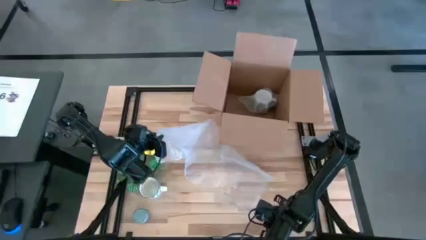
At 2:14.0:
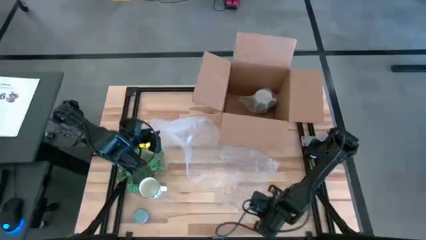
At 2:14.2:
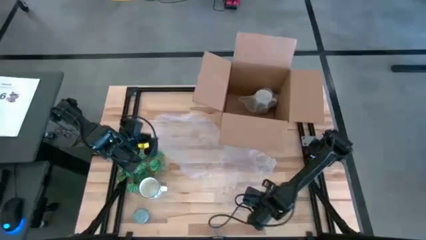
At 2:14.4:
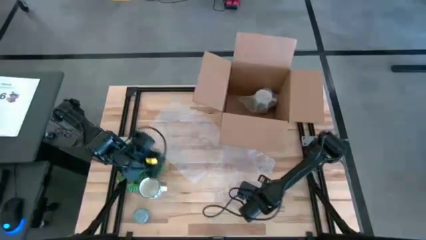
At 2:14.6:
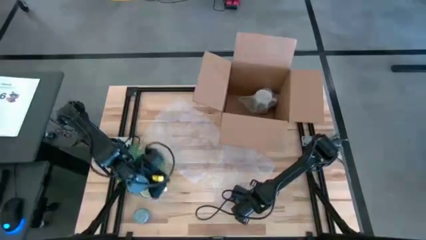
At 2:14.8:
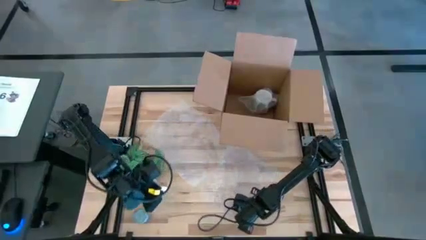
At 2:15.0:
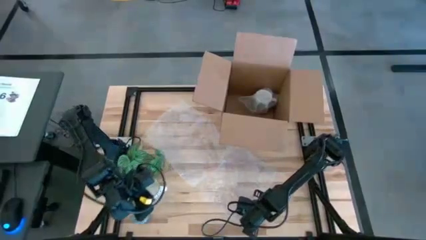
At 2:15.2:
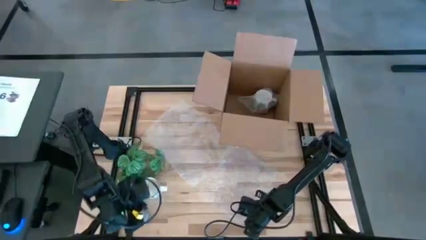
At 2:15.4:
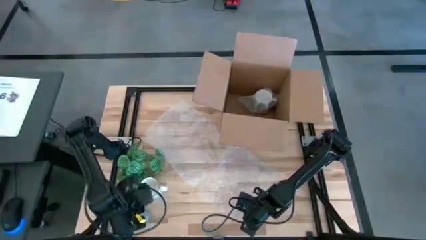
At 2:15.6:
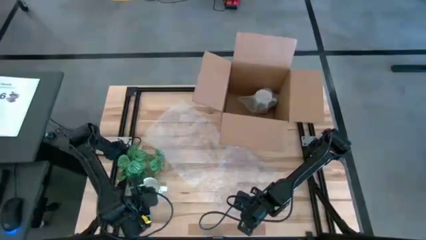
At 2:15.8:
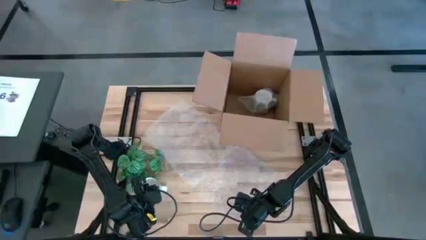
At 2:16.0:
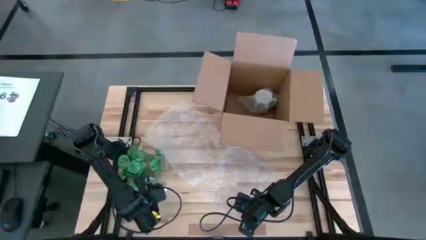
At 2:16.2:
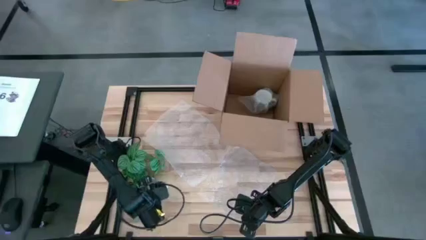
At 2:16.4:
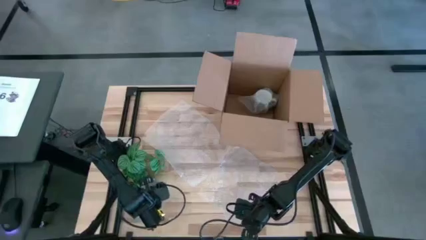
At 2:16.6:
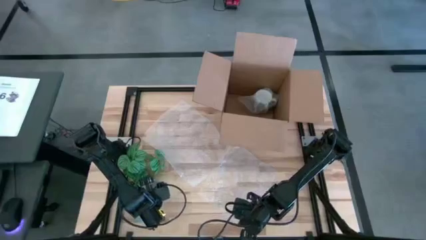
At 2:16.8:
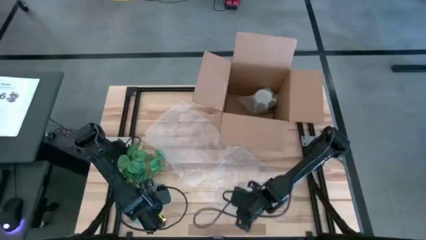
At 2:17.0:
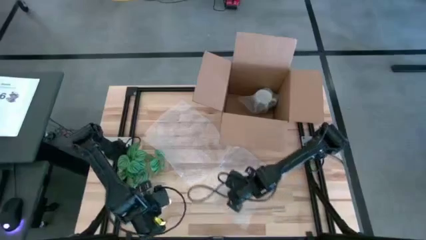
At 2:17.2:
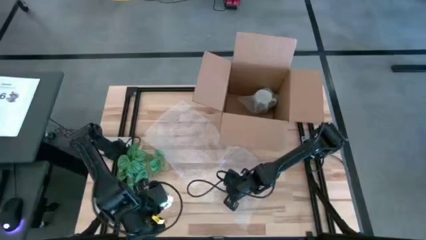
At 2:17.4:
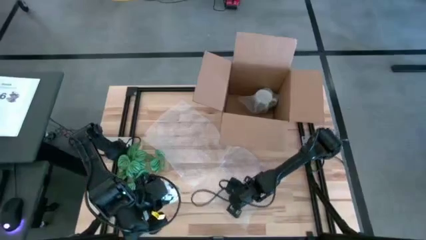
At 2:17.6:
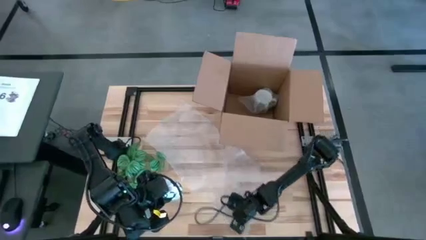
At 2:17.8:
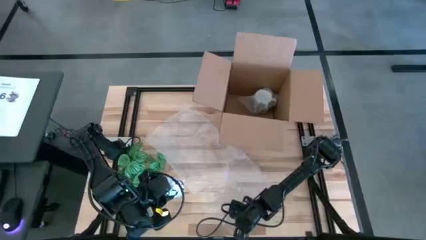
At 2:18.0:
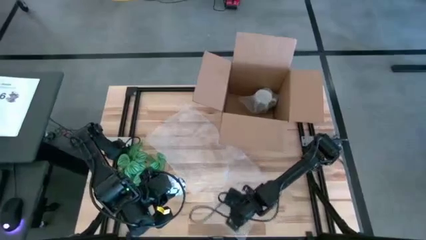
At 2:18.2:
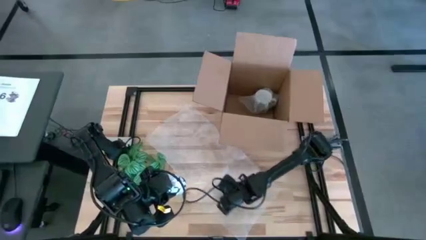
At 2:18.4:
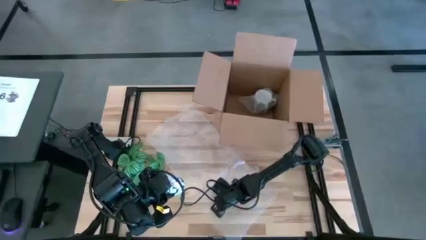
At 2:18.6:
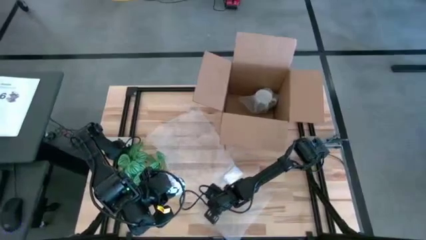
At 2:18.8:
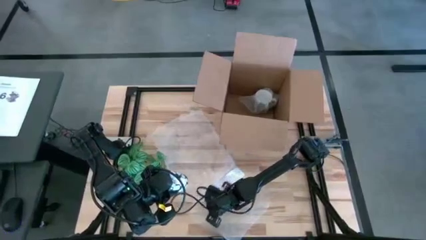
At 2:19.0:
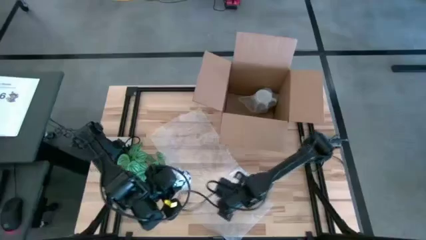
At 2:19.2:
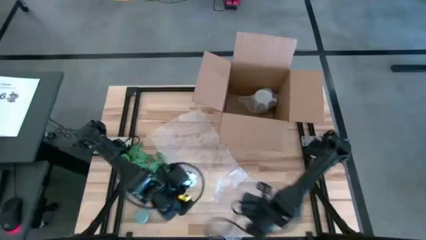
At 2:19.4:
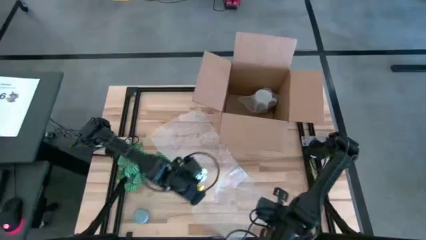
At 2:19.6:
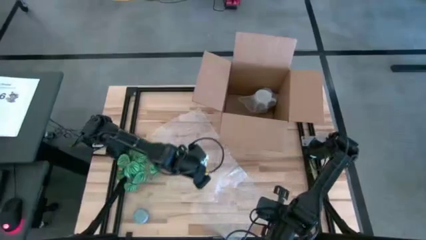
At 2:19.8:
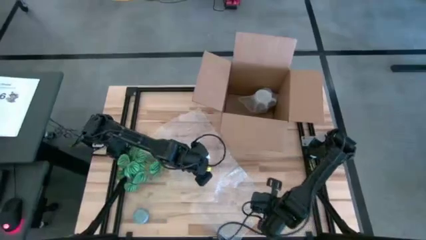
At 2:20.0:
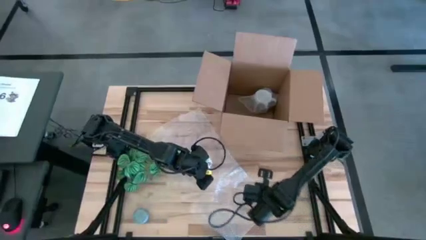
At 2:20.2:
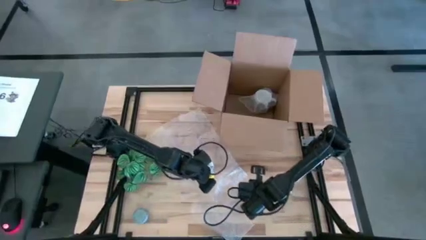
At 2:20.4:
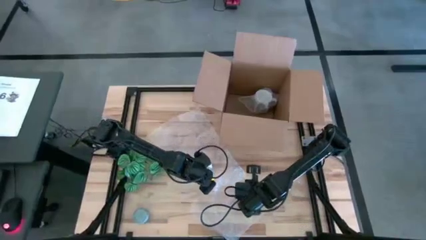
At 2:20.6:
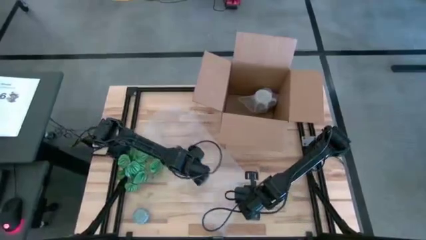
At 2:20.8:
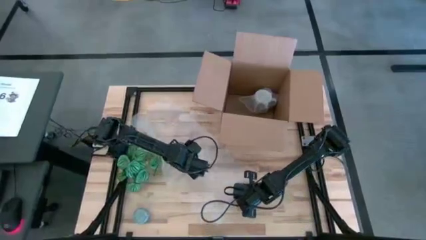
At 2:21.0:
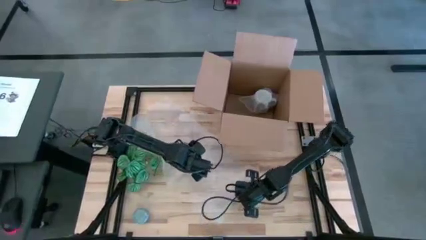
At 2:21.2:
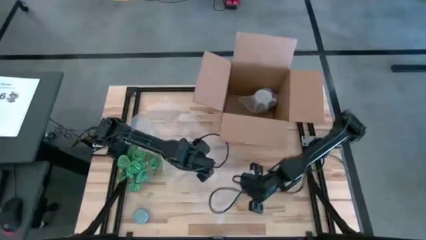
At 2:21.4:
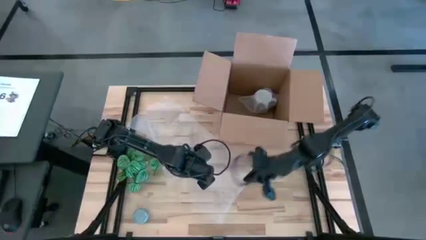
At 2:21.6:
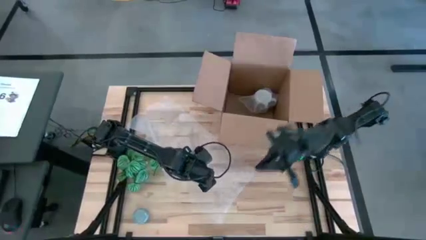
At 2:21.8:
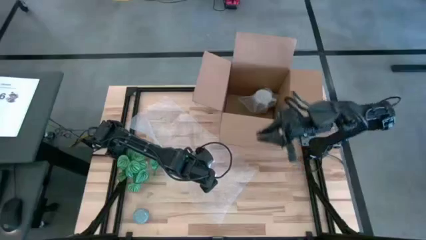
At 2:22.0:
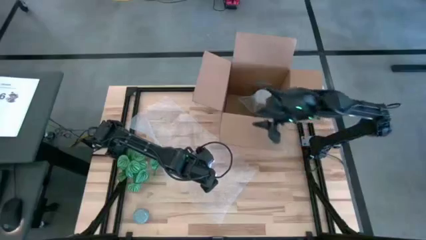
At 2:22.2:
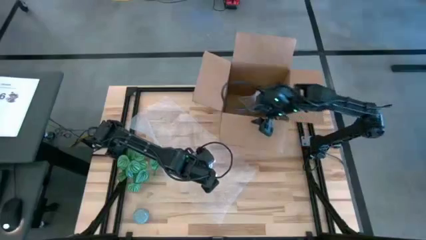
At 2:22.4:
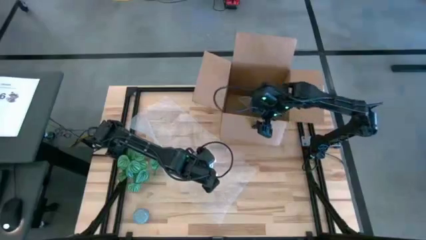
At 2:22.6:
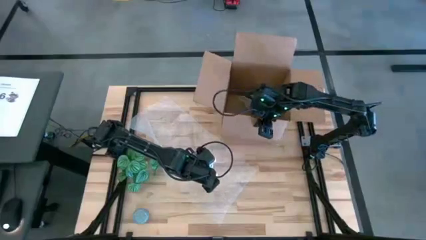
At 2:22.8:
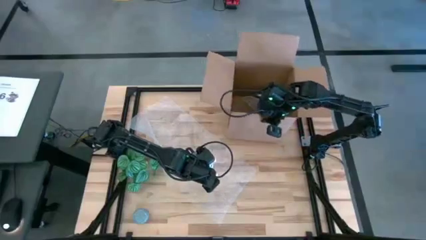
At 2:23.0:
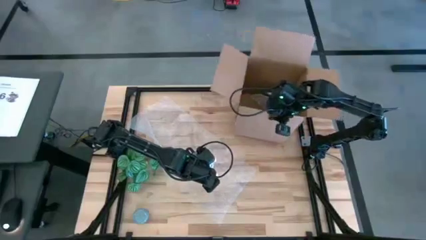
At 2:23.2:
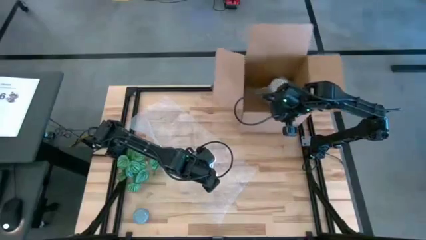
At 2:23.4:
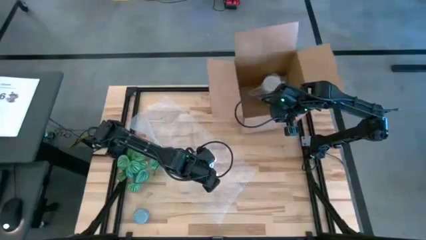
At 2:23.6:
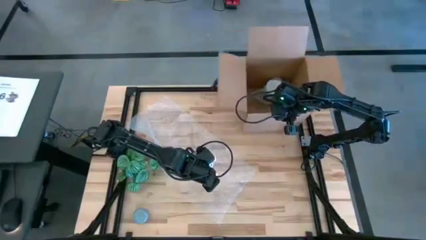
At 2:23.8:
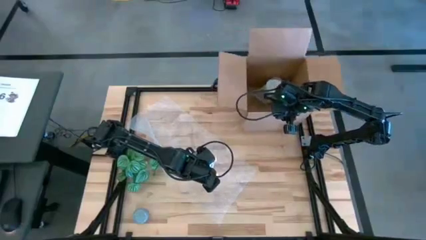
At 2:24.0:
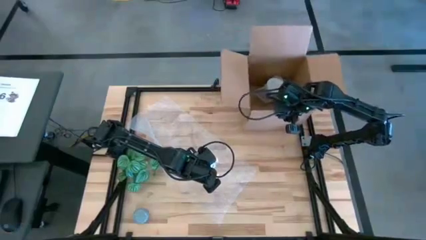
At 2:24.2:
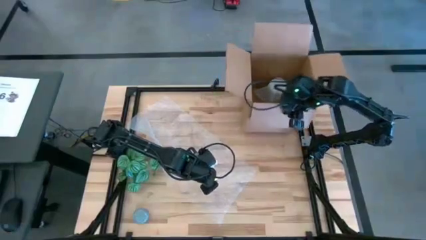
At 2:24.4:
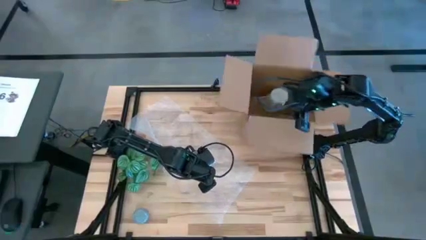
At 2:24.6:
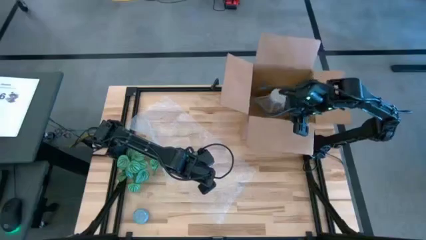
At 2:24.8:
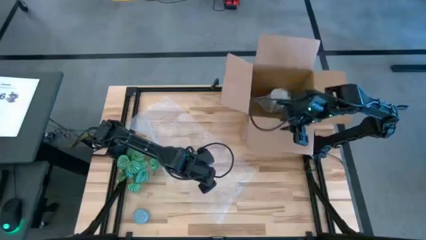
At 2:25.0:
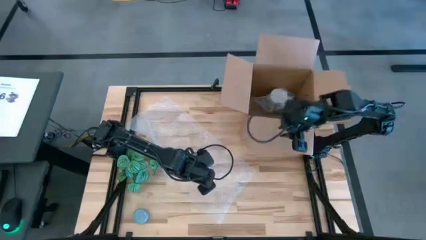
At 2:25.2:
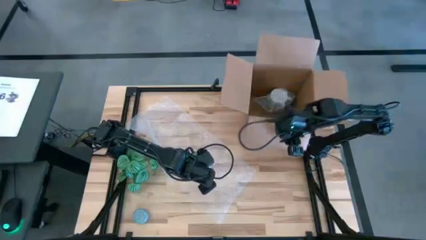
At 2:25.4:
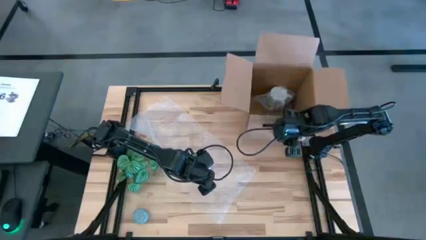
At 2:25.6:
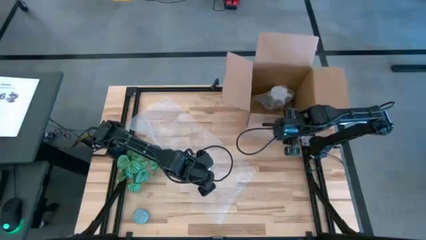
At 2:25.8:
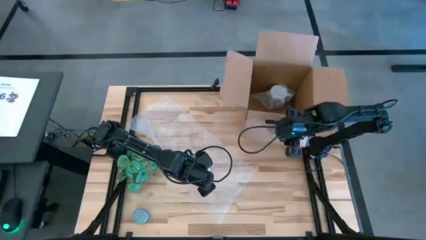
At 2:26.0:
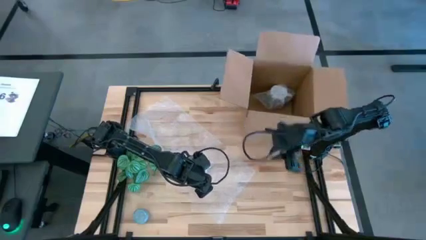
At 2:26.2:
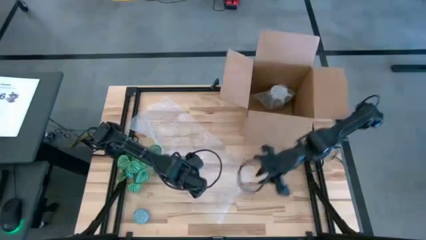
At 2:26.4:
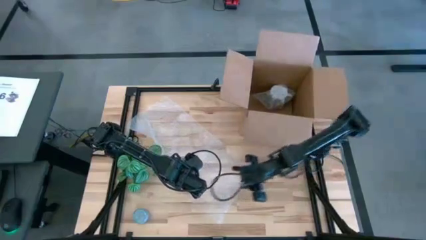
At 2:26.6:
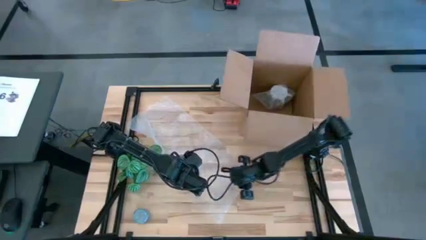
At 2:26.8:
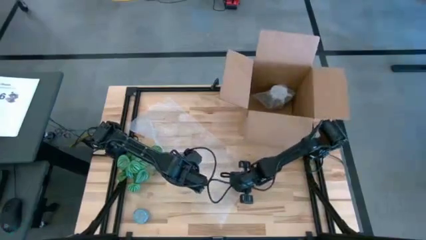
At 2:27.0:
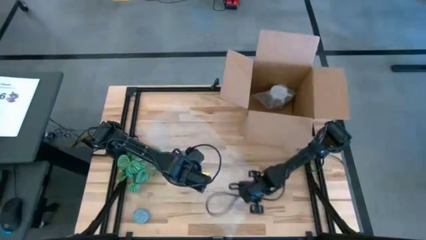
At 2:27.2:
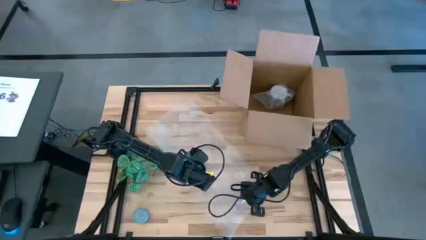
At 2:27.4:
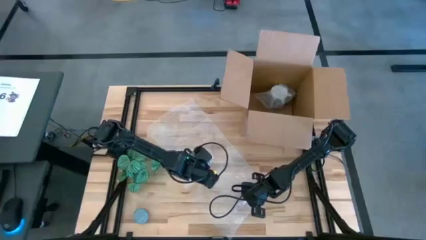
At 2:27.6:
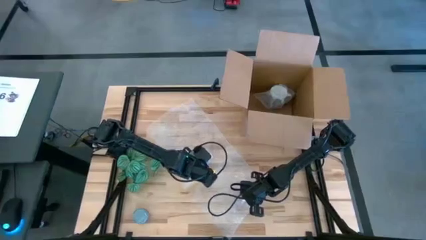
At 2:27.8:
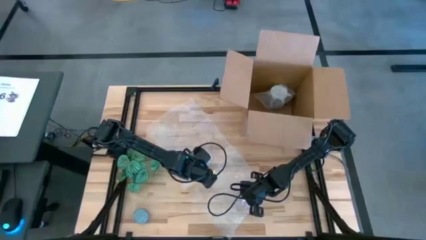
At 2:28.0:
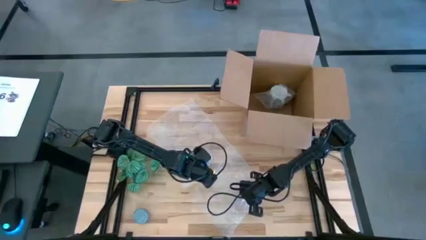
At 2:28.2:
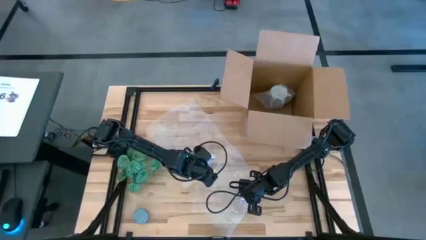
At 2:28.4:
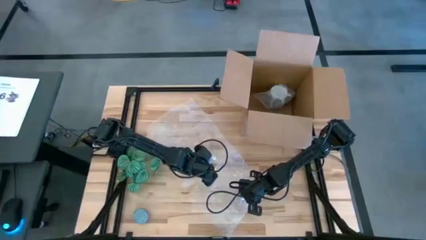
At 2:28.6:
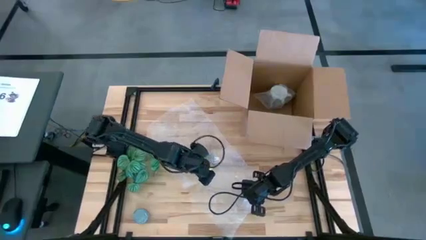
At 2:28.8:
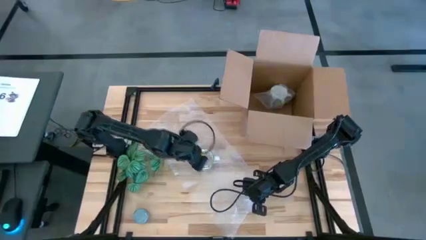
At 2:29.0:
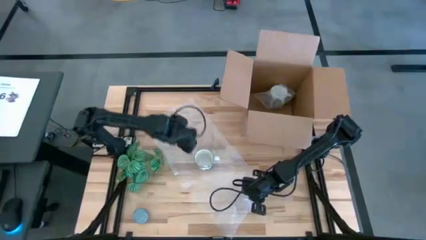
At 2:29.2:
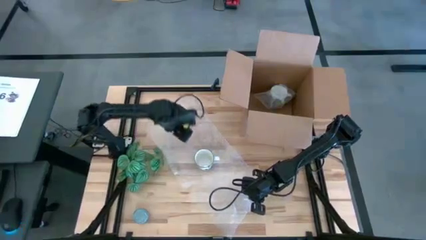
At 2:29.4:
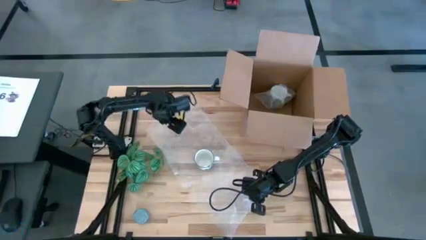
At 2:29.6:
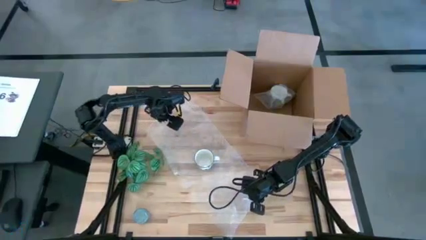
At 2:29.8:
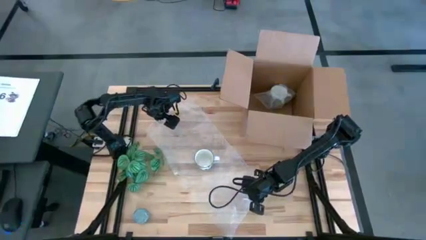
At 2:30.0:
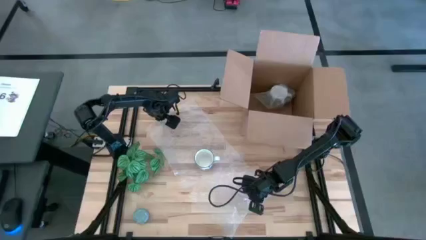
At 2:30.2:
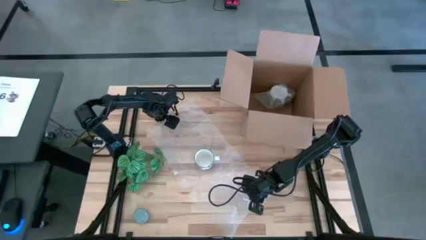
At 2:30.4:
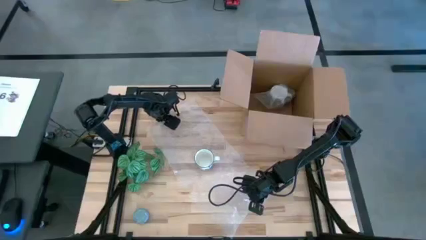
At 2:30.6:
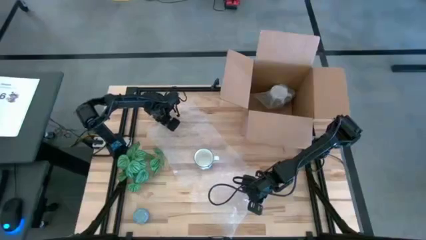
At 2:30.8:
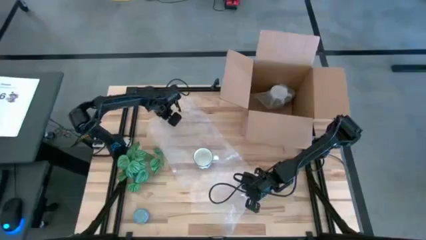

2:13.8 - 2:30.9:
Task: wrap mug
Wrap the blue mug with bubble wrap
